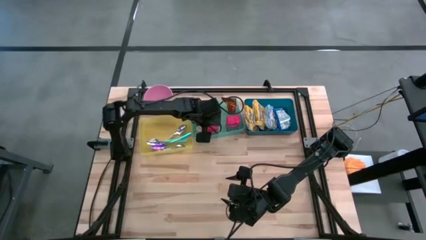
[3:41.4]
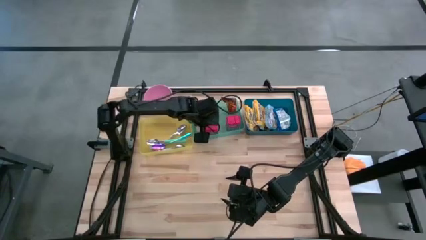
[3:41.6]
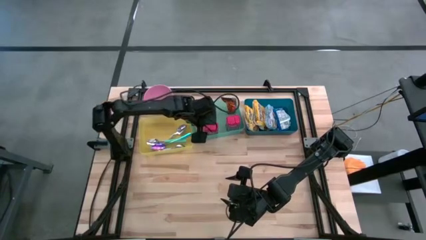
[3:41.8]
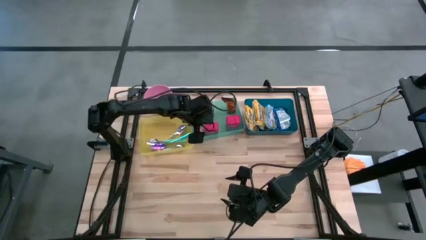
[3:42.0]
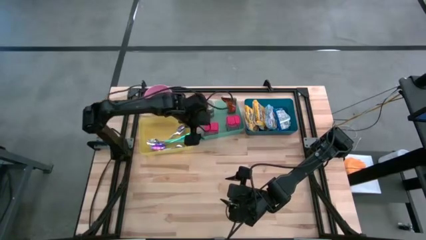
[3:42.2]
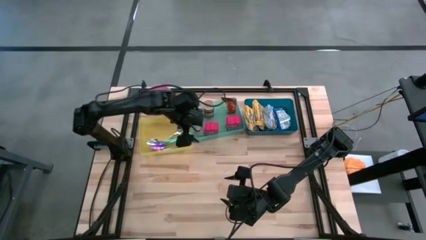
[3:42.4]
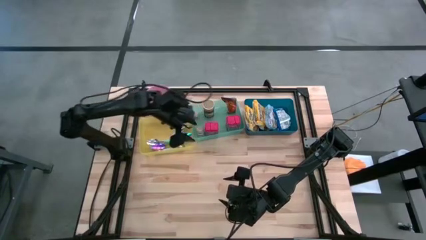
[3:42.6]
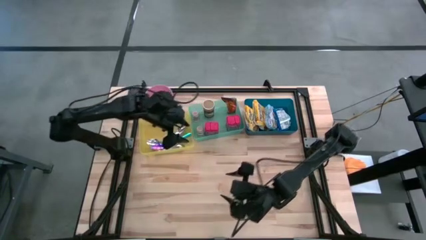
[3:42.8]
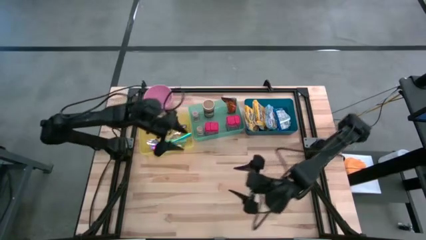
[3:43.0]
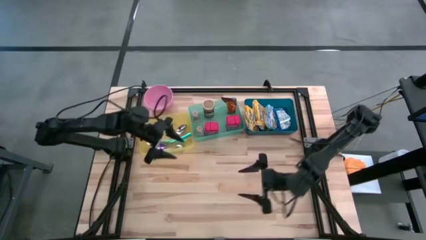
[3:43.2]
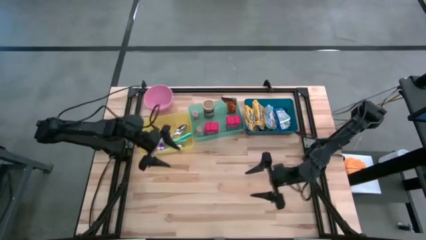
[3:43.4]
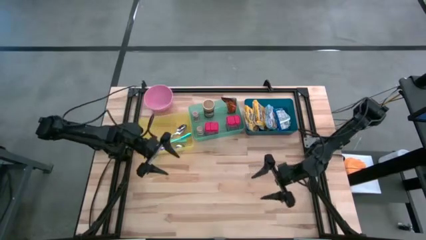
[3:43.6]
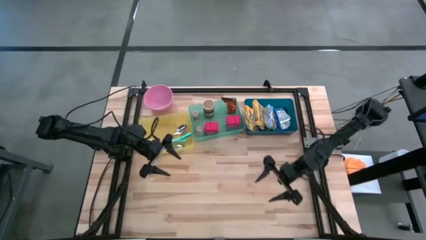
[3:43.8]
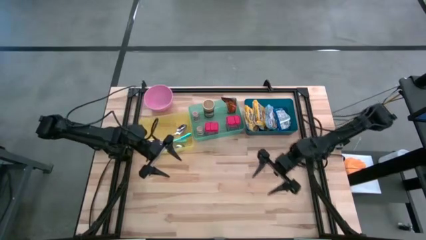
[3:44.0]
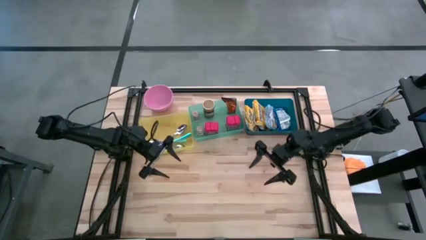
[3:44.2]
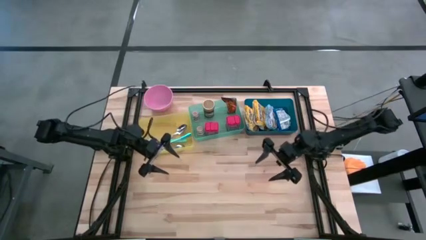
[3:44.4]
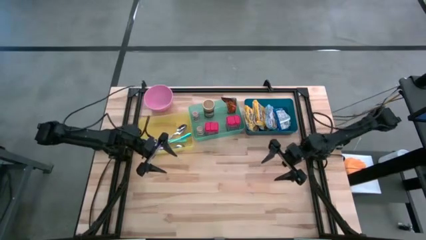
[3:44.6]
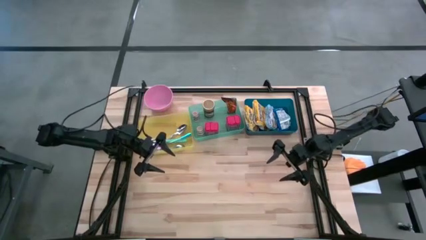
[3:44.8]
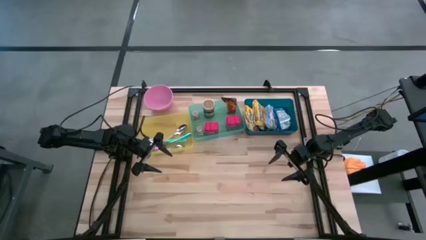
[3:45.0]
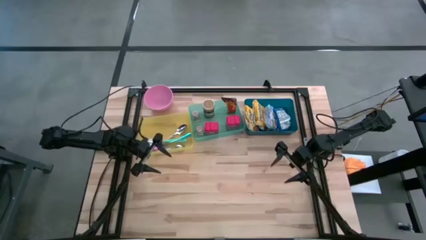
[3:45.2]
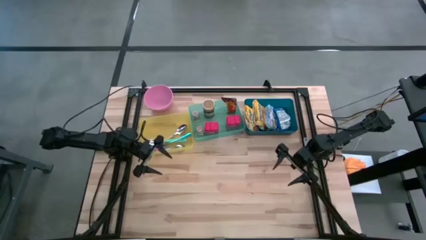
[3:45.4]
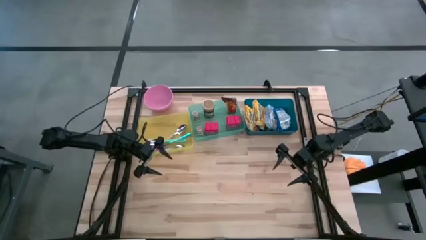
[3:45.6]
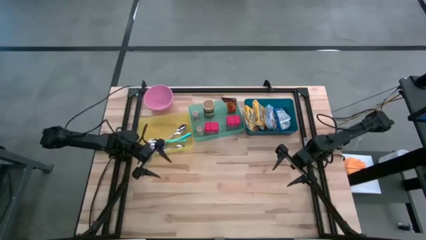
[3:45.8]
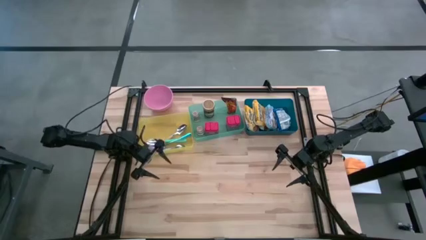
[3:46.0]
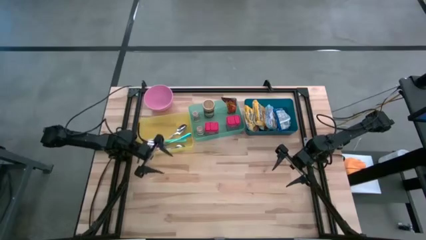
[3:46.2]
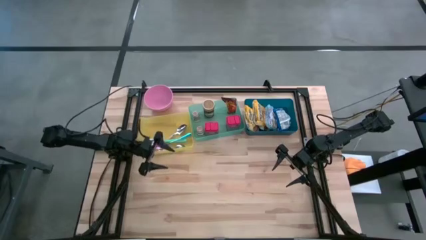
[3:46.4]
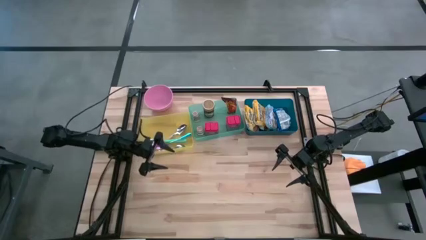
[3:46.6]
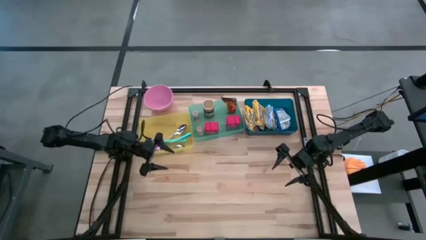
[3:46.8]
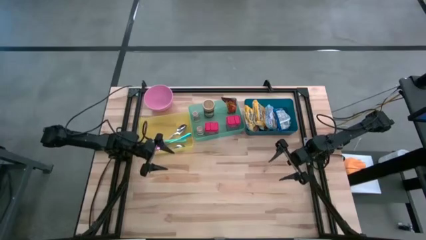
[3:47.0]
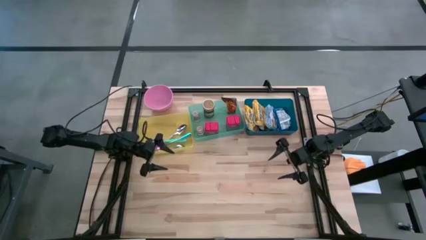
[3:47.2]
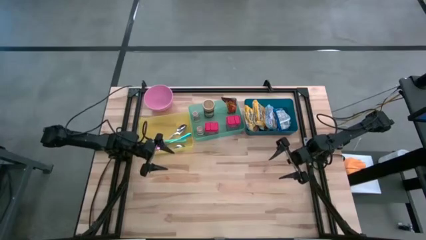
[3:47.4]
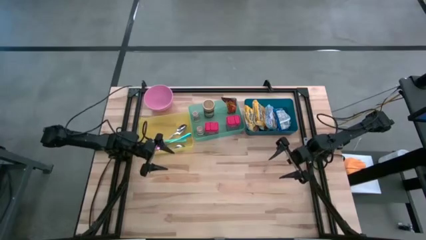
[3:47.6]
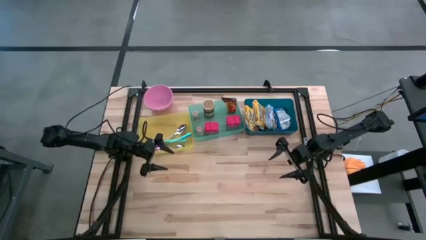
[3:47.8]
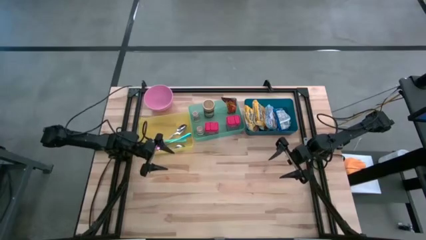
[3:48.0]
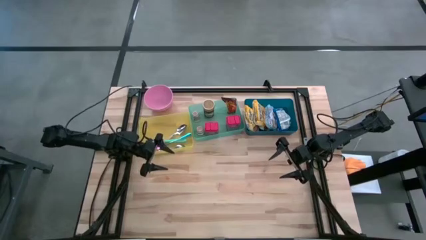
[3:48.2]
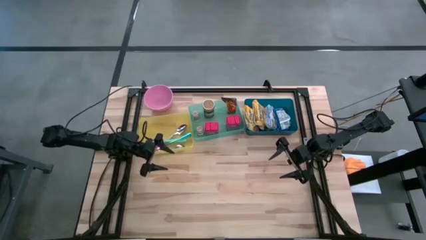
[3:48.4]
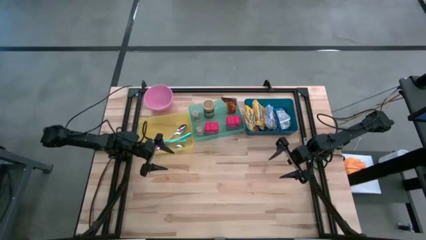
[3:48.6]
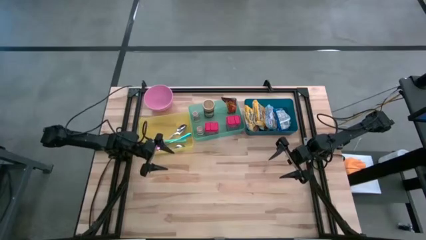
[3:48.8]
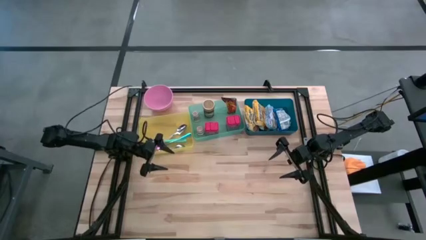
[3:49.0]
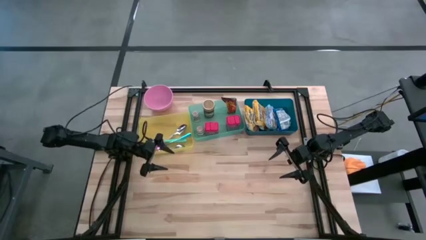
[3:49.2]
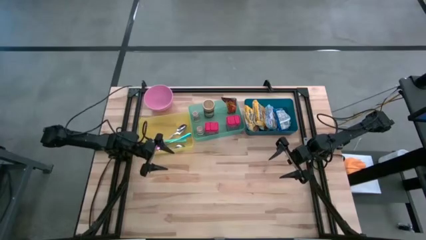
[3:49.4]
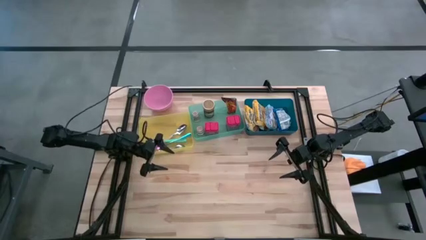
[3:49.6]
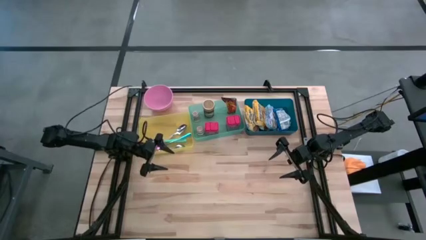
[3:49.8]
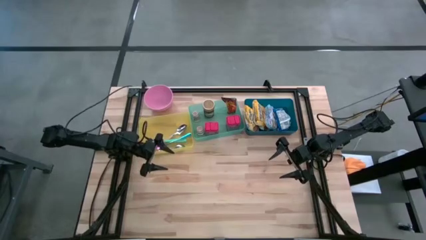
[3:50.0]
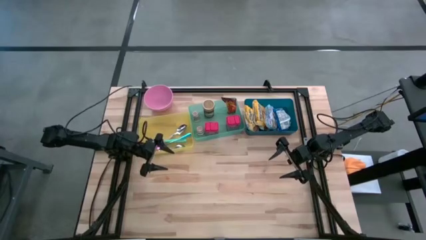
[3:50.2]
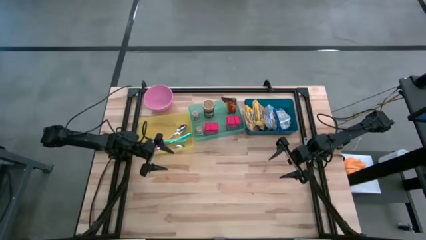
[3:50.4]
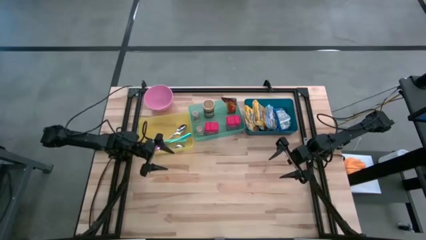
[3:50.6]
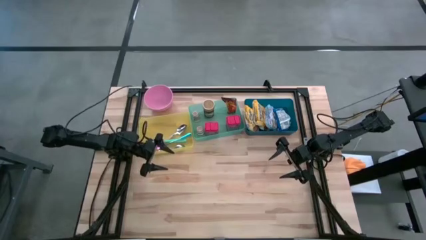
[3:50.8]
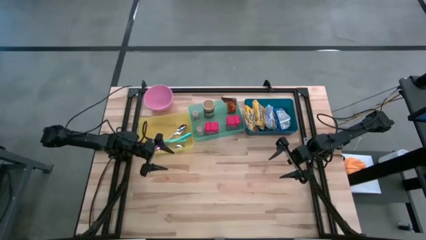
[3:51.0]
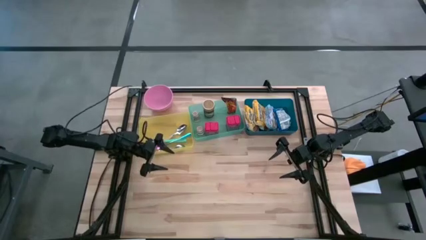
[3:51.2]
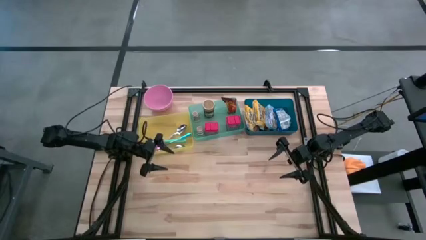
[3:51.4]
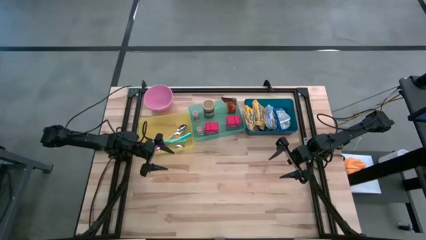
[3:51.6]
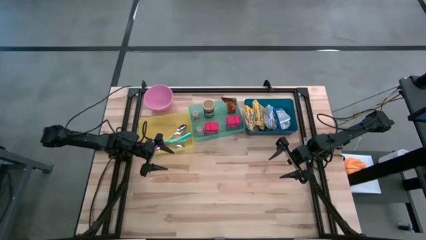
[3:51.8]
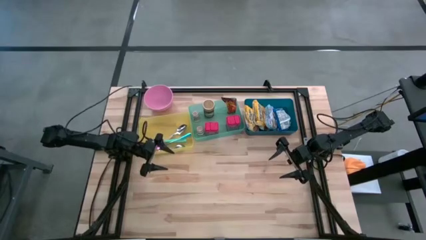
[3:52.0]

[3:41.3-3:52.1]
Return to Home Position
